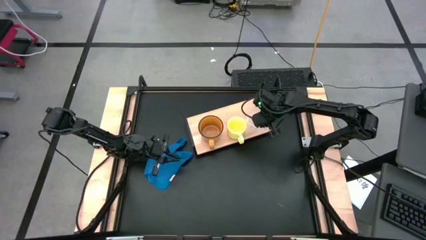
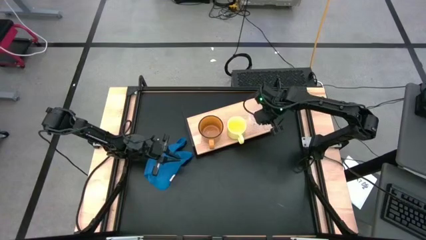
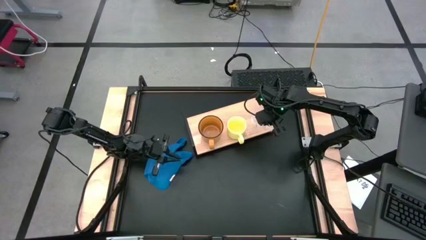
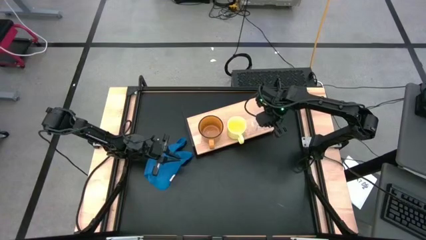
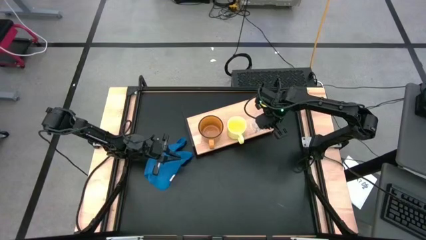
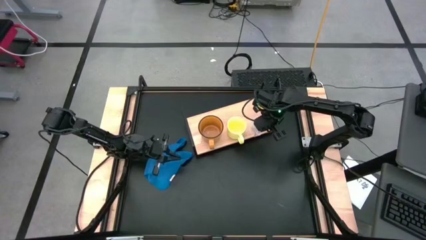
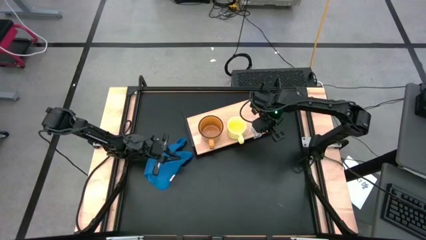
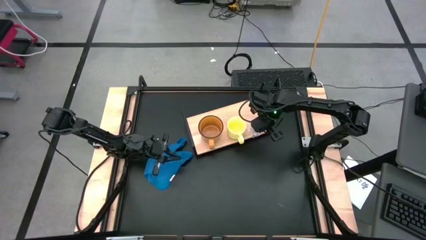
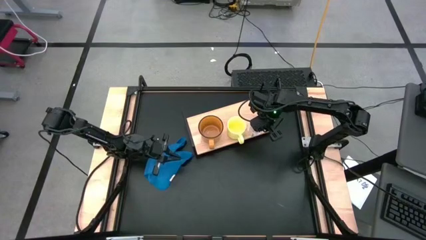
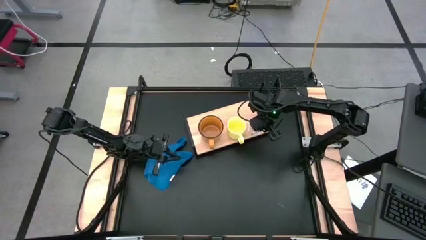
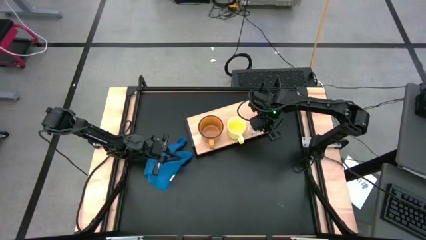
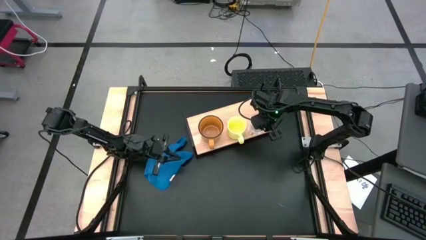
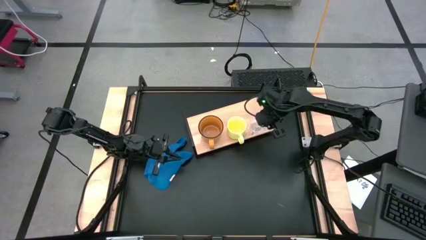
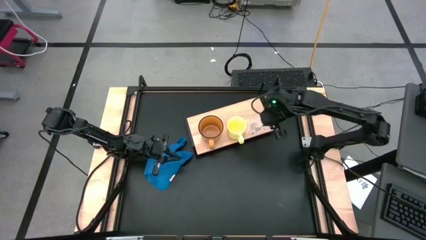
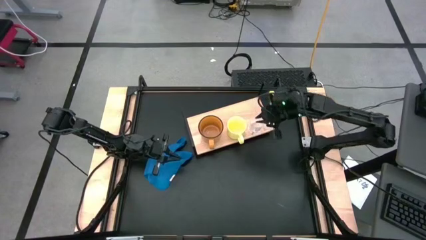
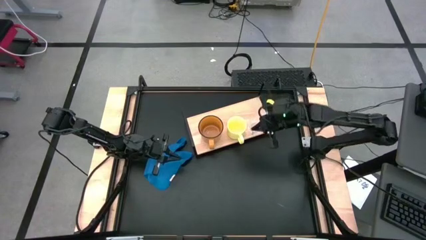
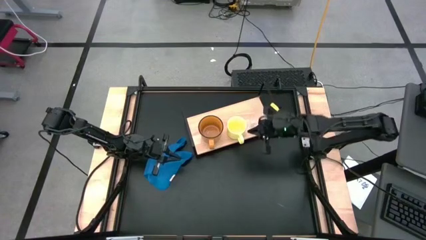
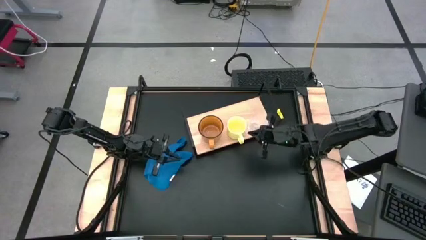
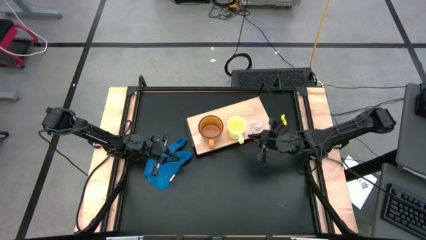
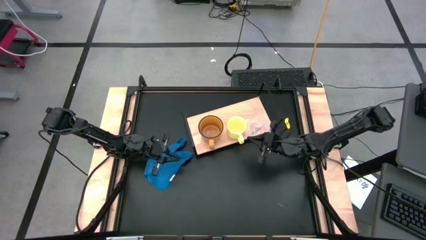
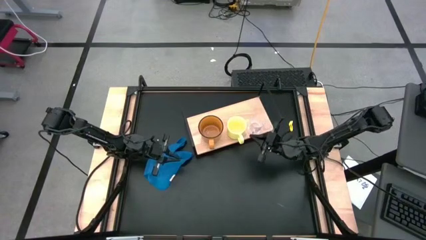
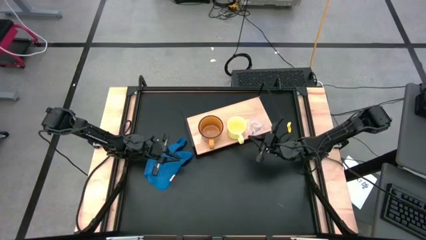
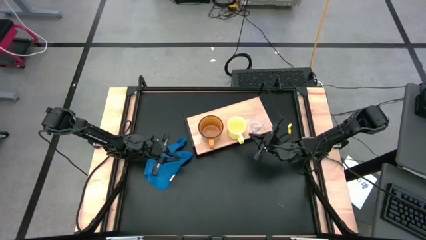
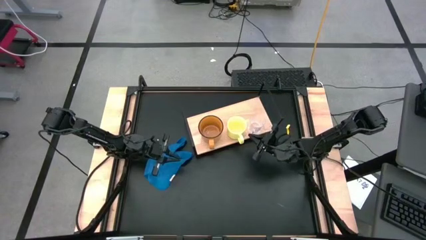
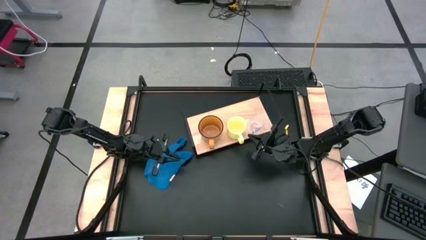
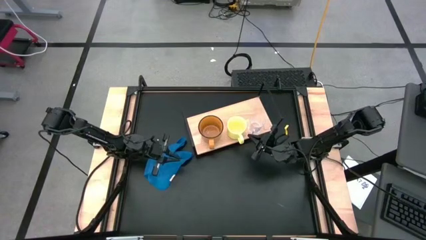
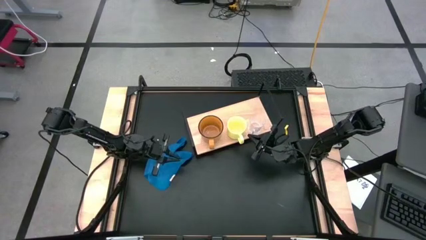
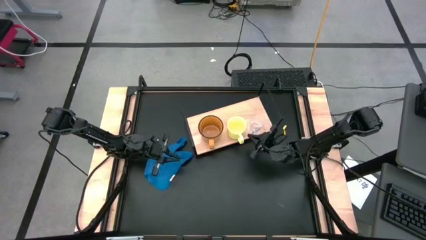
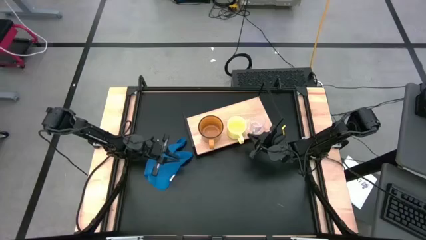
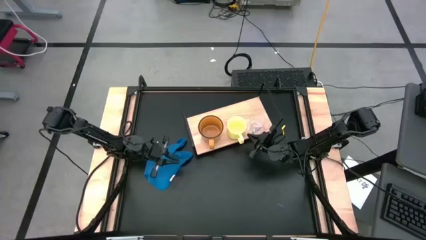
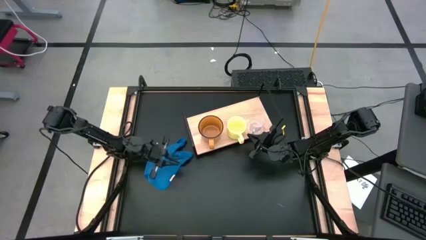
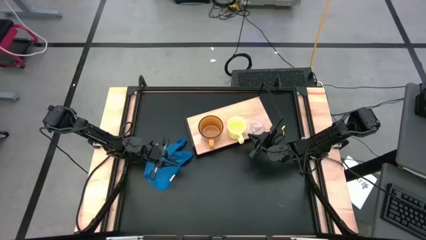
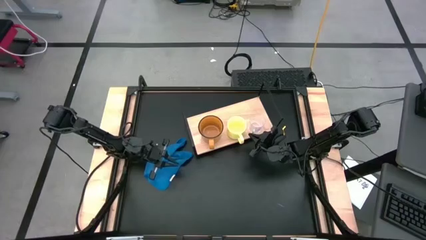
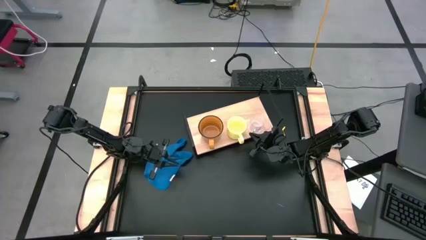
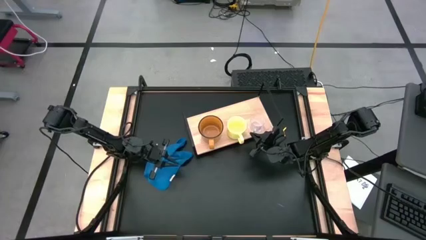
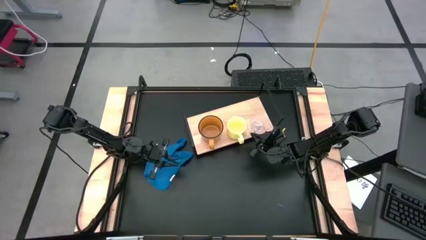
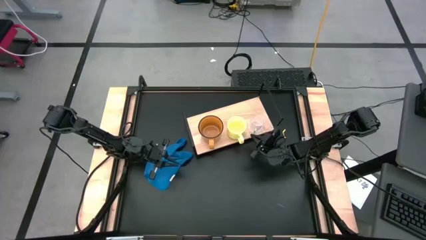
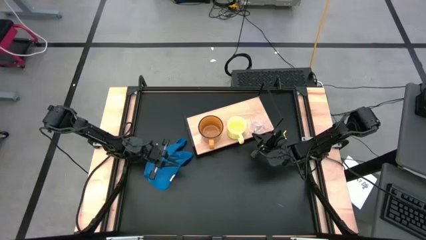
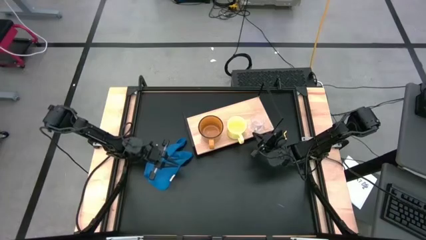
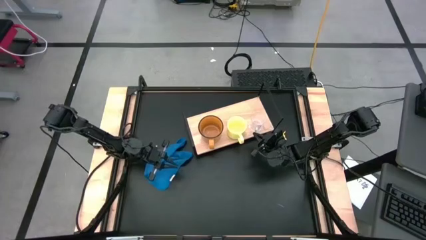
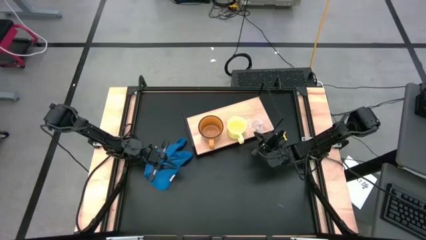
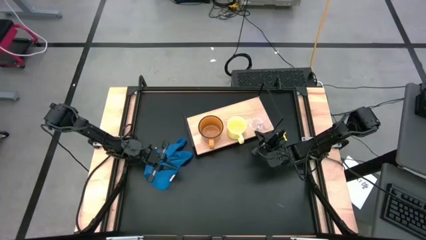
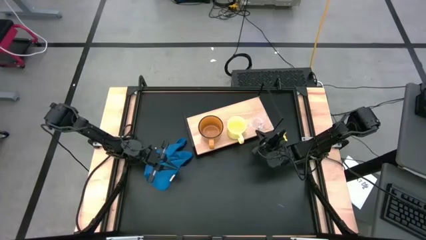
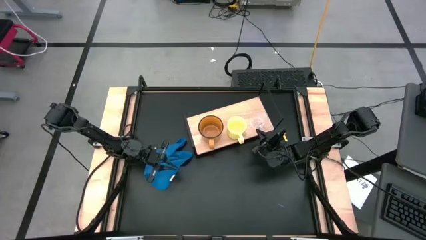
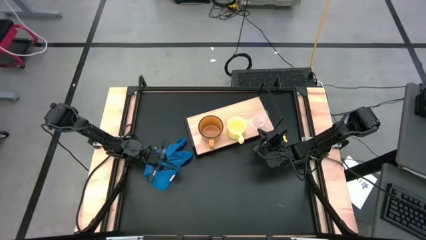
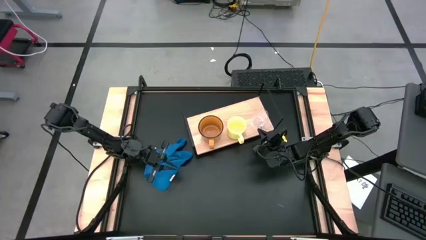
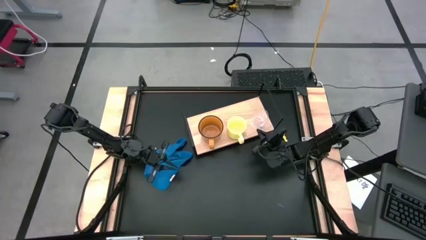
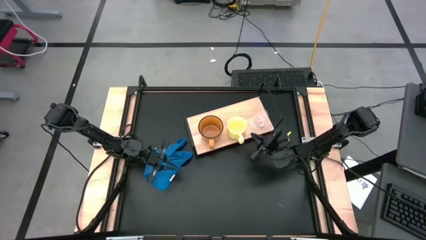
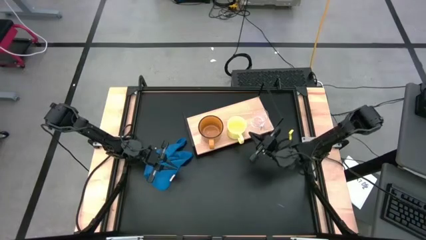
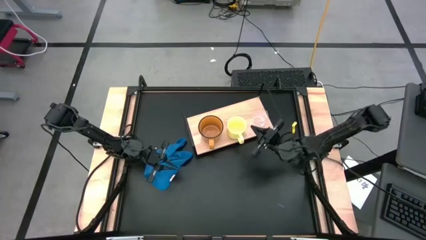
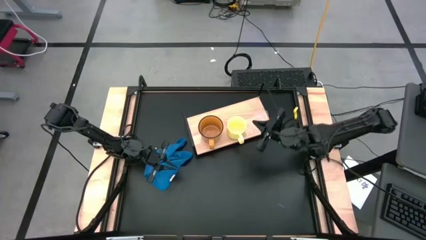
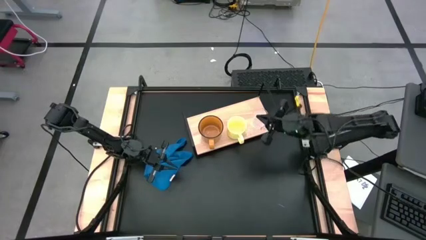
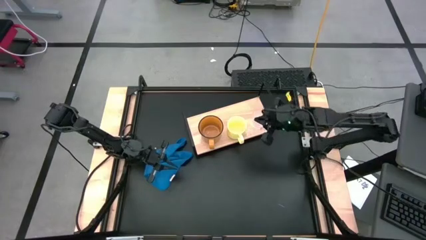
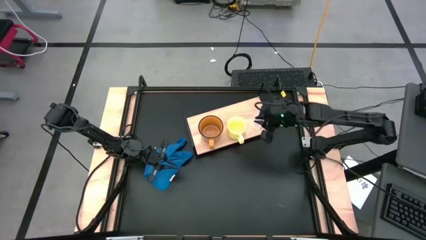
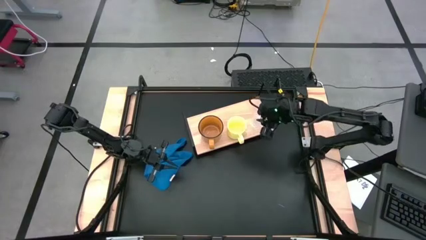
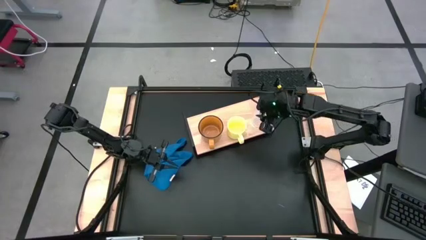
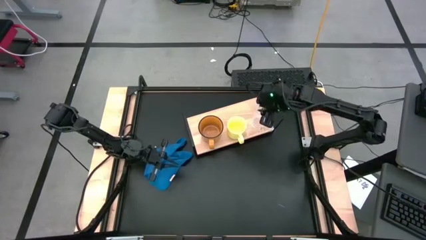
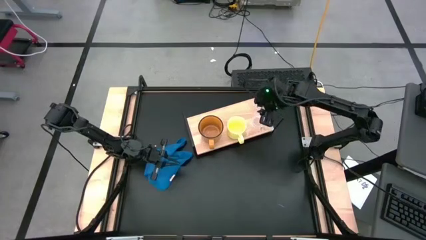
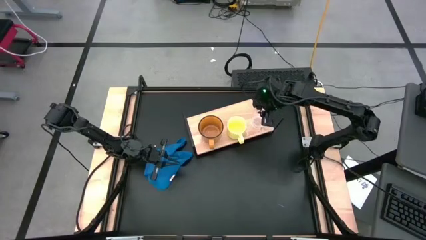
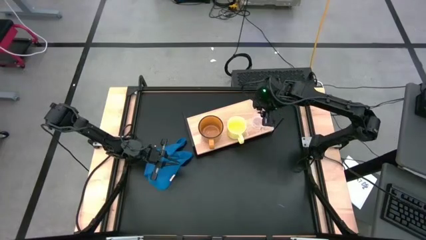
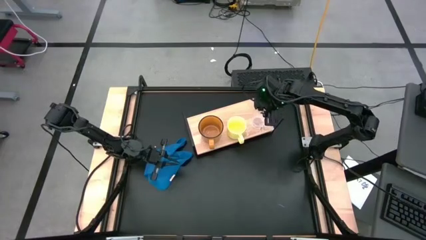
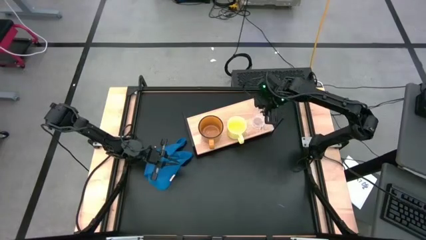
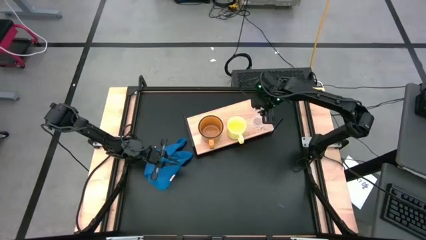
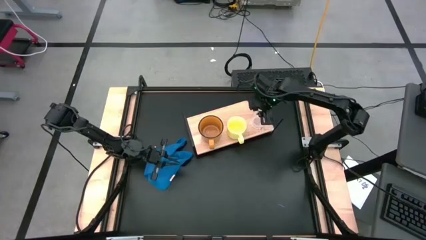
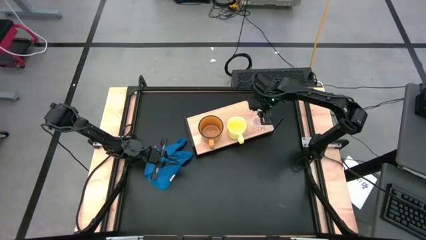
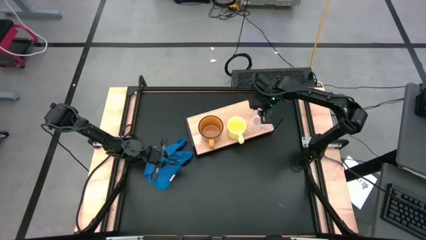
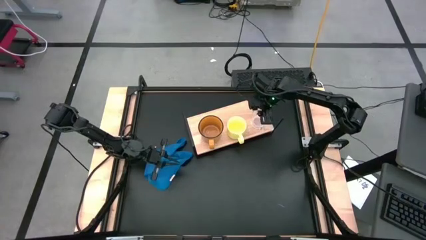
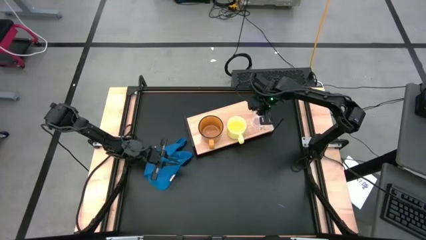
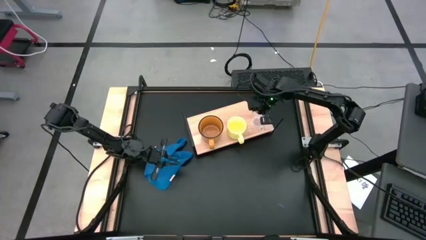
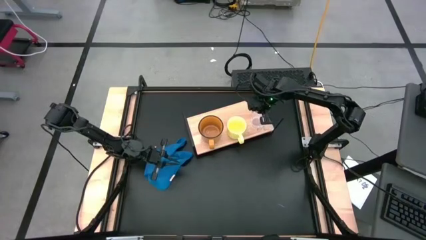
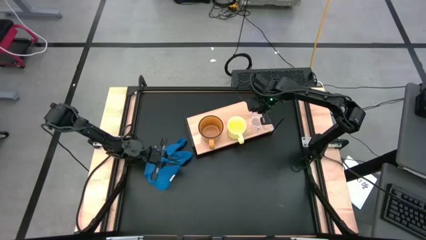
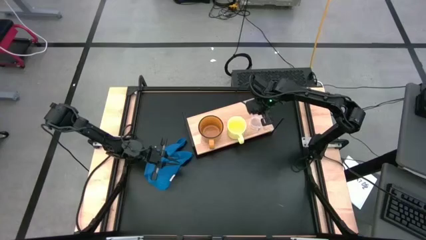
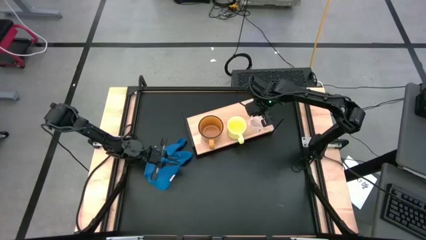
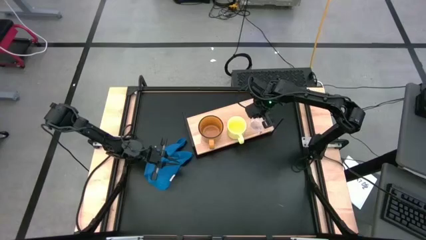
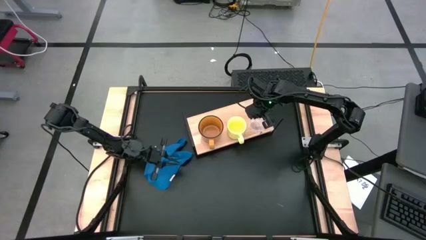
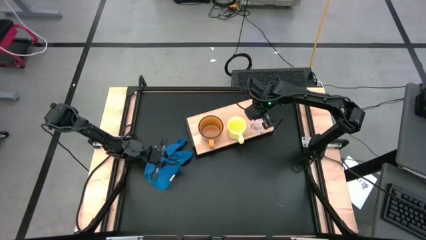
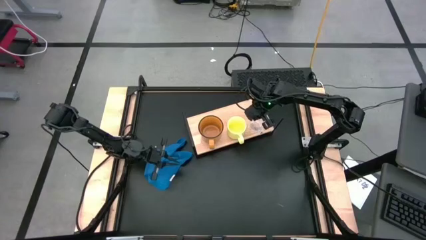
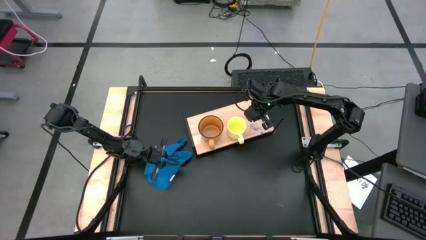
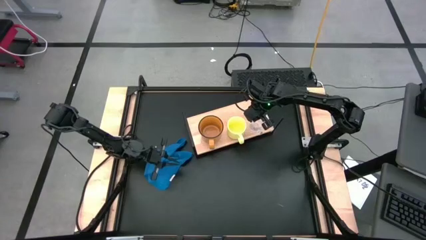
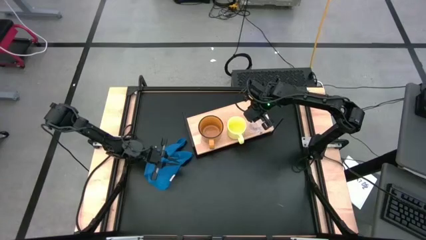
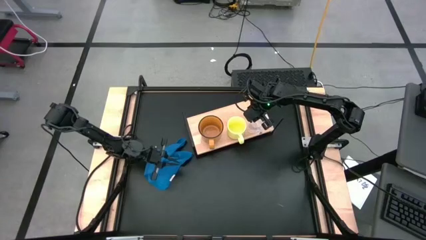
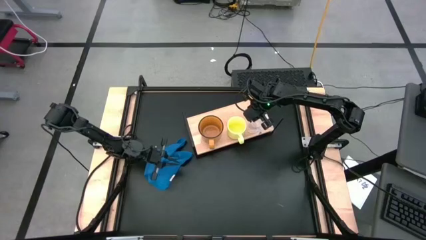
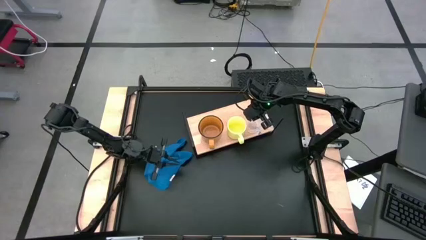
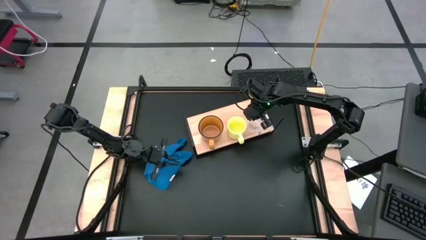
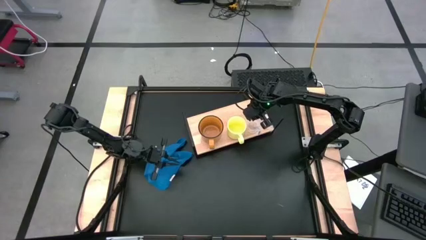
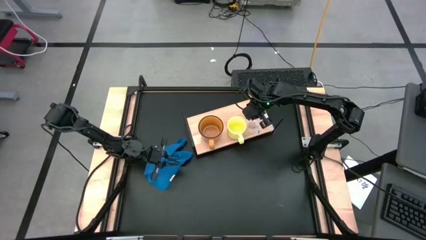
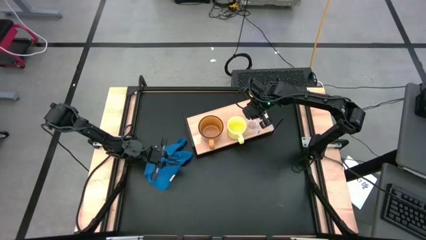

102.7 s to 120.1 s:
Task: Stack small to large cups/mugs on shelf
Put the transparent mug on the shelf aligned with the yellow mug
